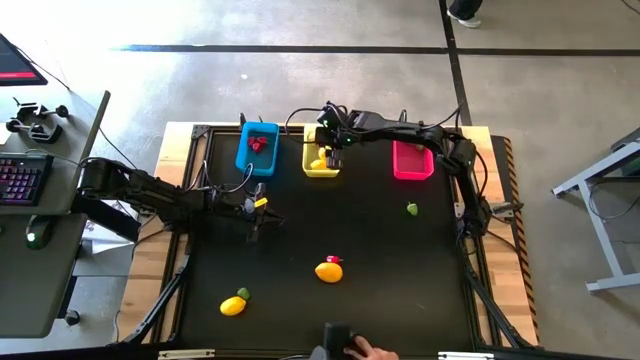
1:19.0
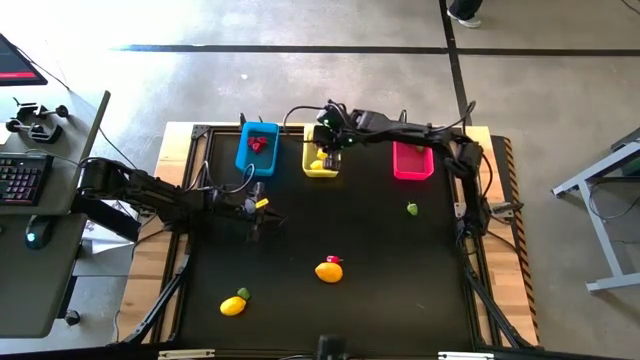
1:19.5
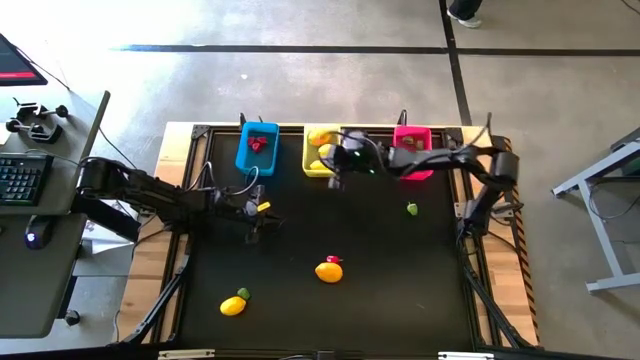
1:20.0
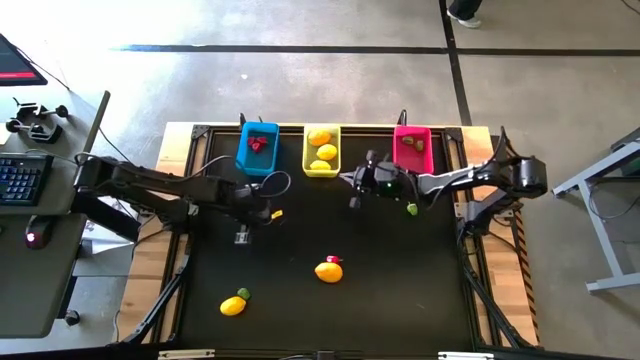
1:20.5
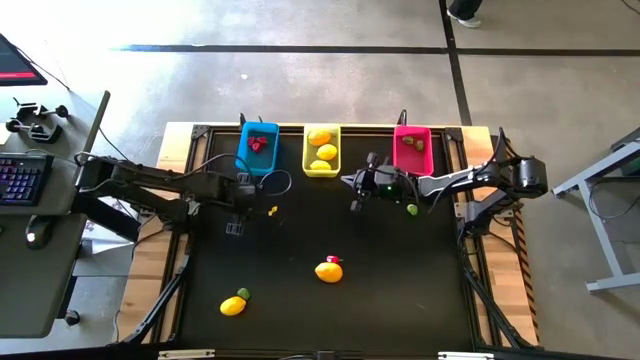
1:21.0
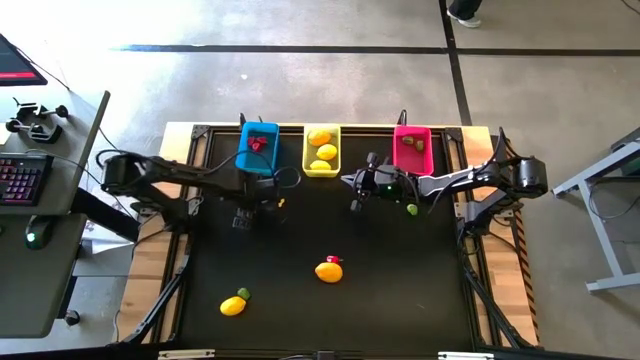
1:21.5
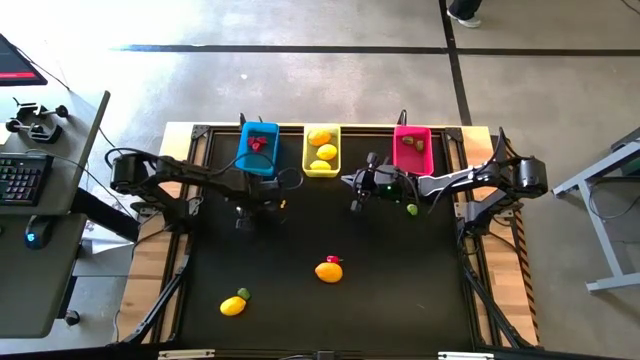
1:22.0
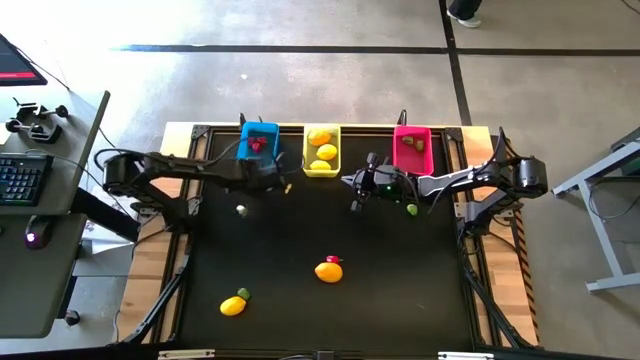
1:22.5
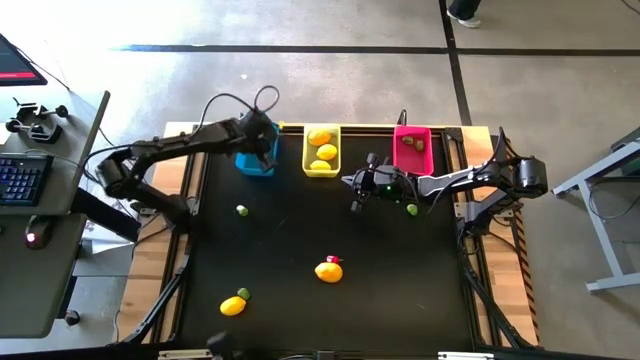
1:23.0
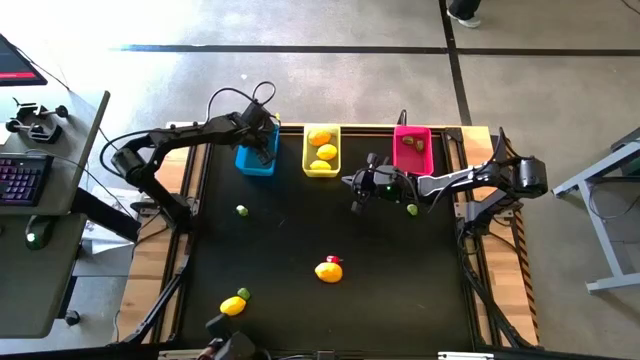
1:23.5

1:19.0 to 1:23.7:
Task: Sort produce into baskets
Put the red bell pepper into the blue bin

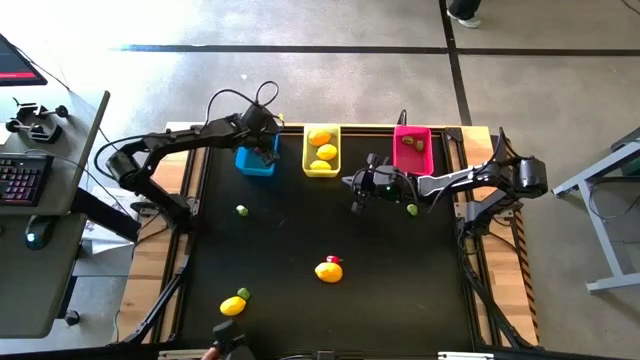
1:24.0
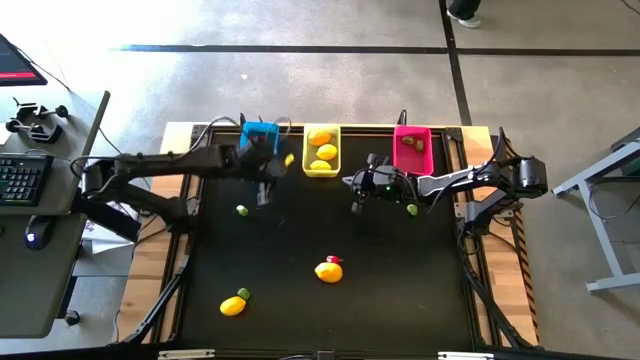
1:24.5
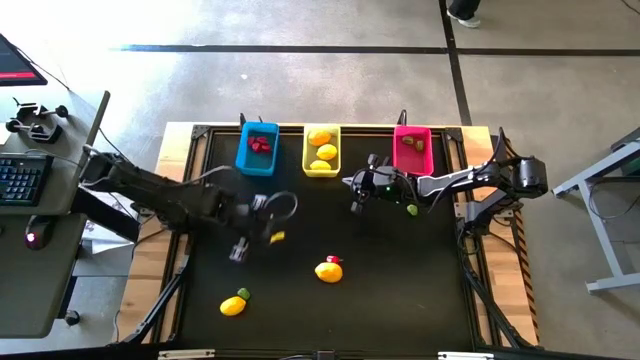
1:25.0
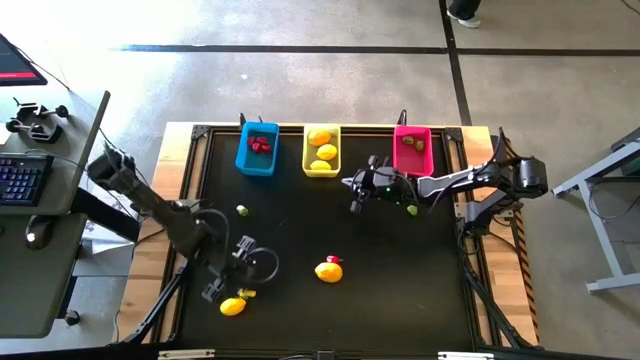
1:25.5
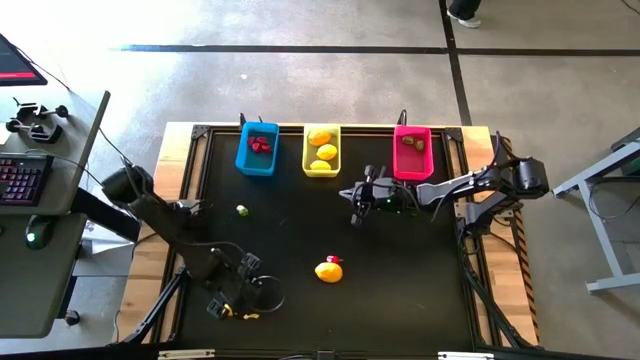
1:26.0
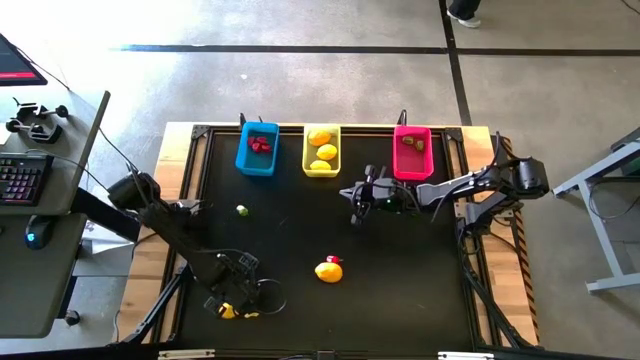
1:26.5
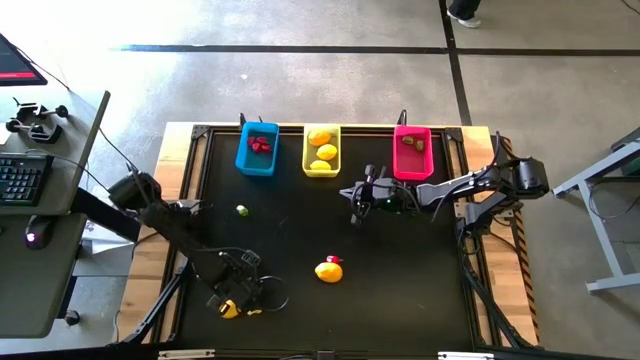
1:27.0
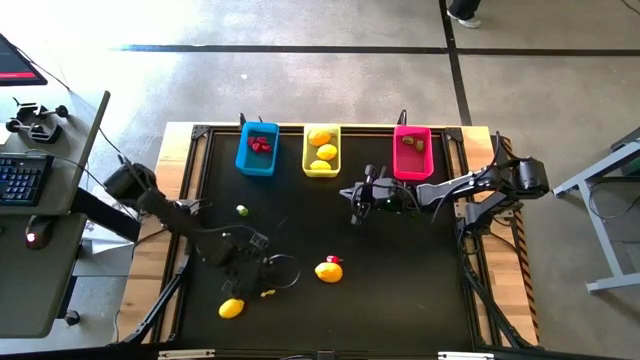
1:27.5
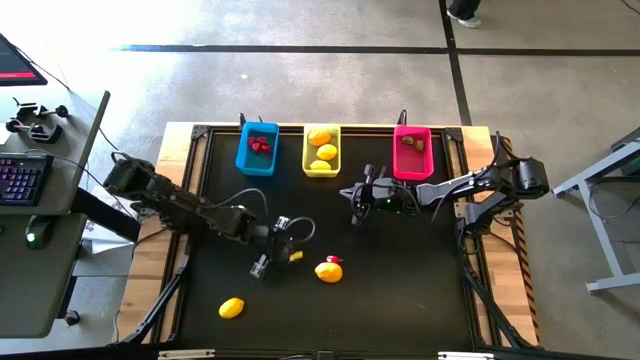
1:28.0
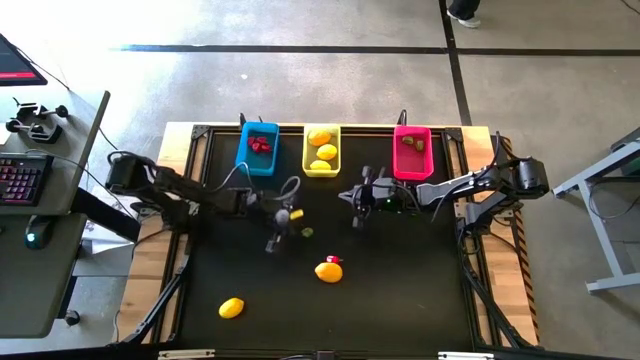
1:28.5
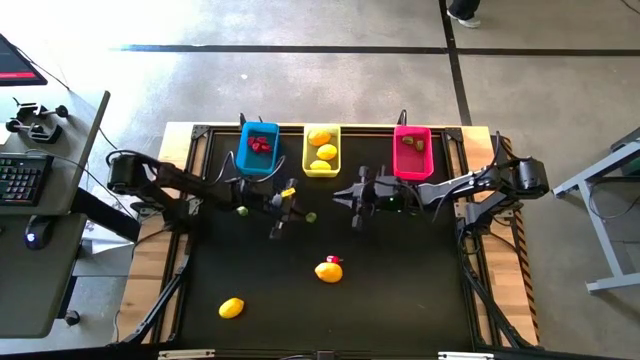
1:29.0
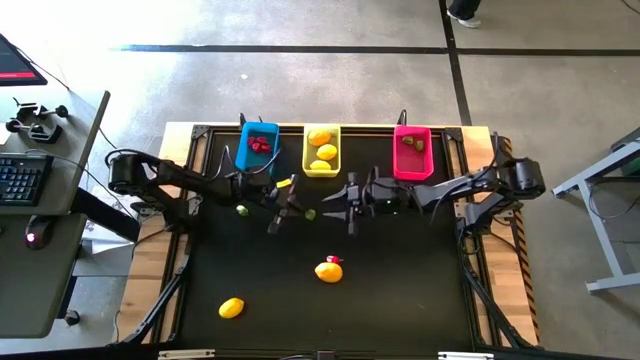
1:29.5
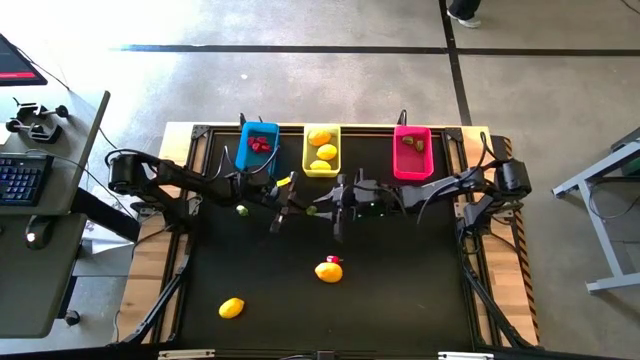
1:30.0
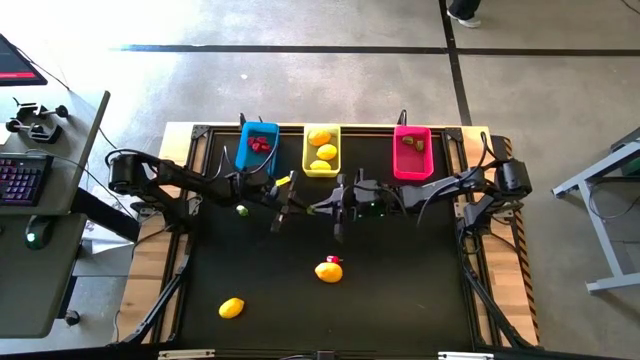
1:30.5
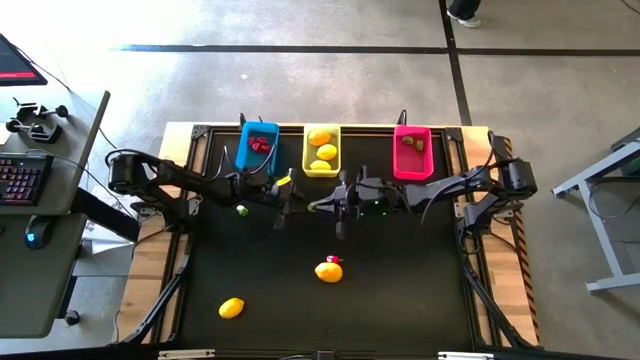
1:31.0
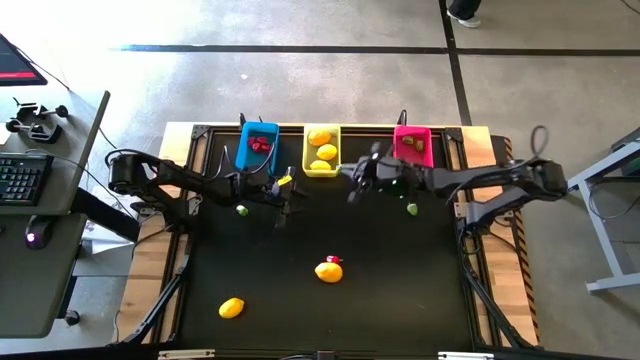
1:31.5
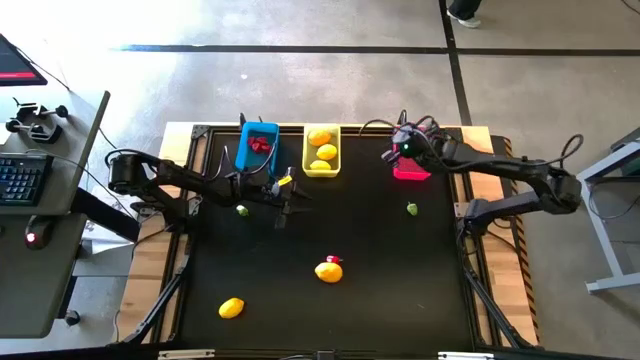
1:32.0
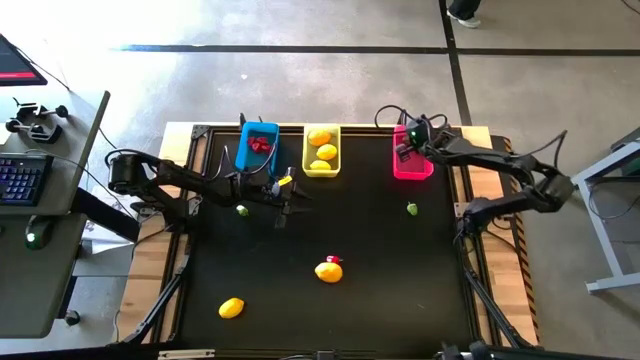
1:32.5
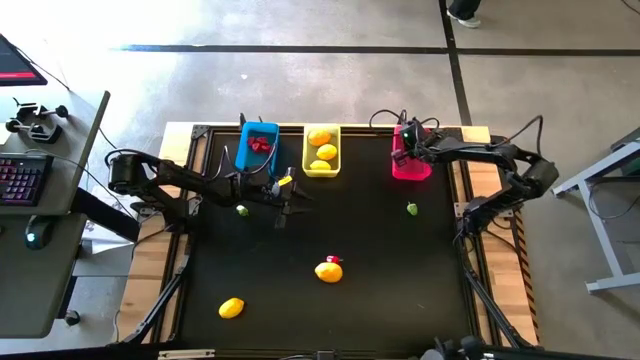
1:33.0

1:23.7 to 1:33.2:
Put the green bell pepper into the pink bin

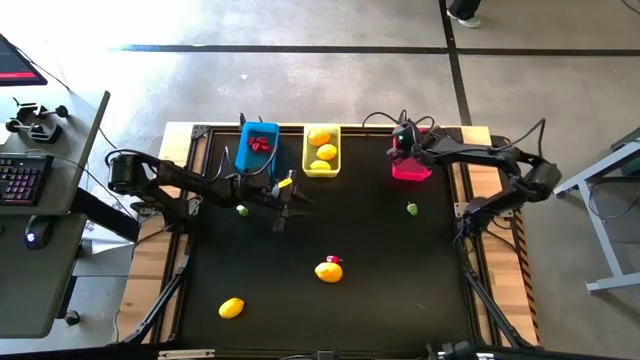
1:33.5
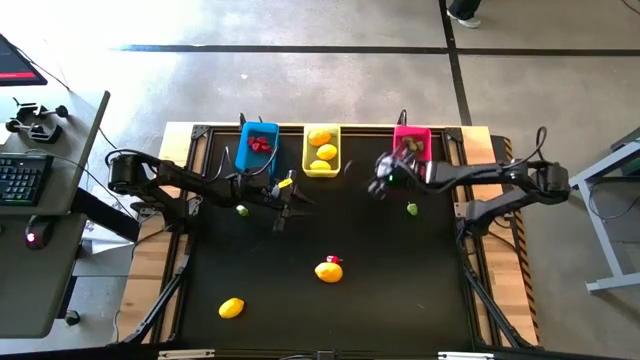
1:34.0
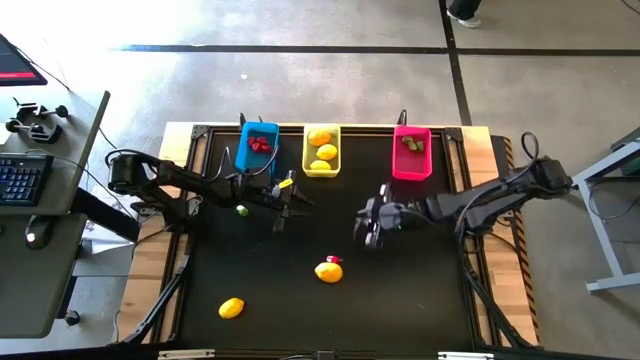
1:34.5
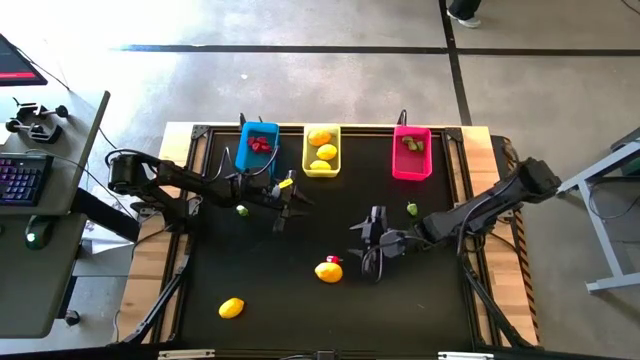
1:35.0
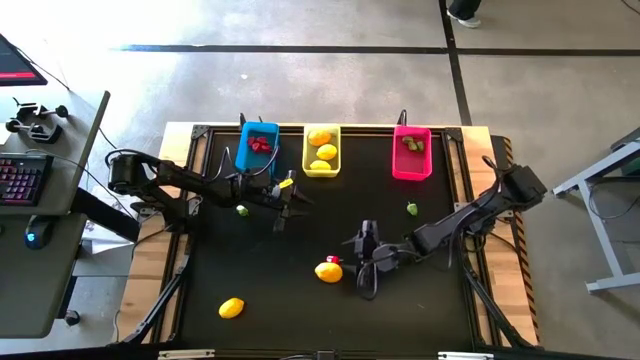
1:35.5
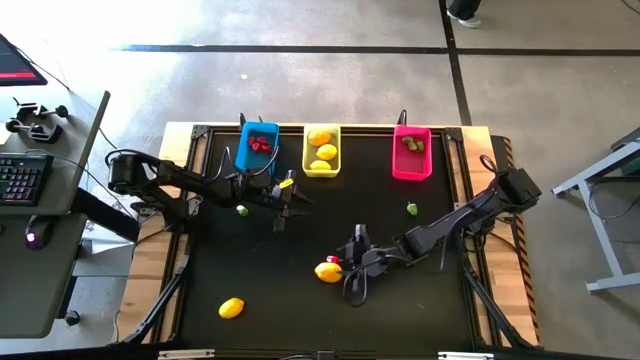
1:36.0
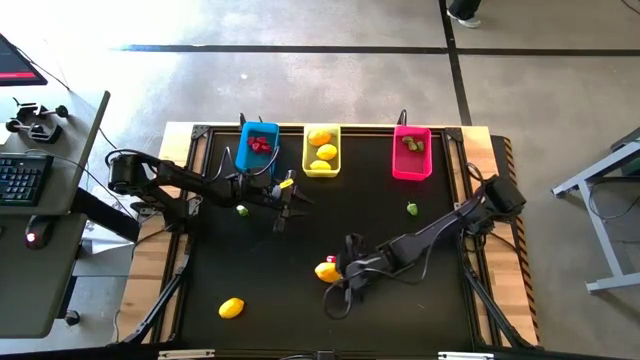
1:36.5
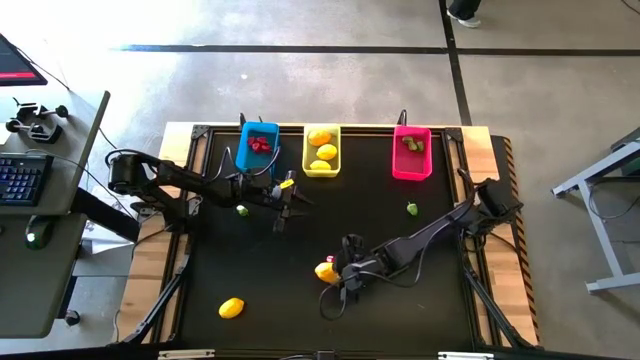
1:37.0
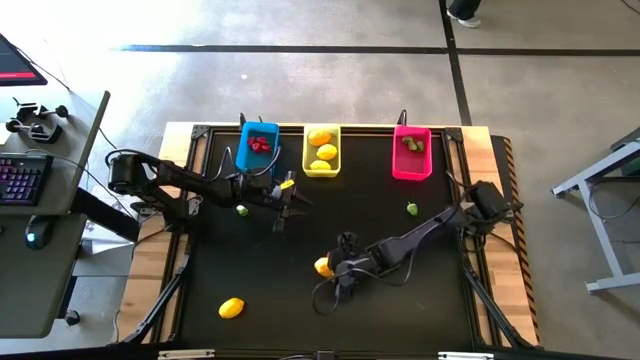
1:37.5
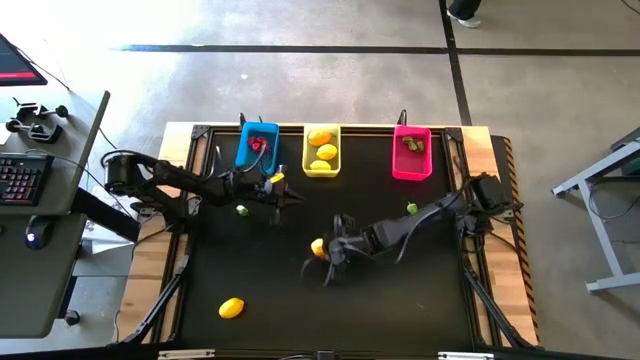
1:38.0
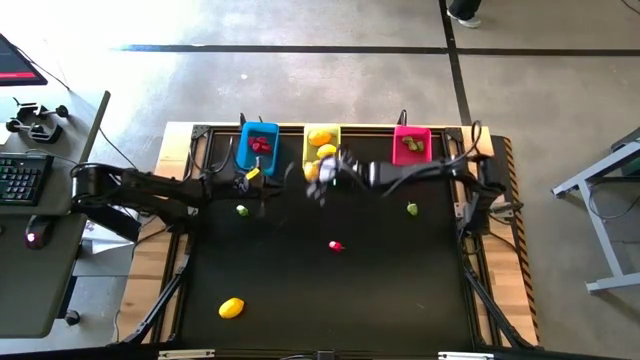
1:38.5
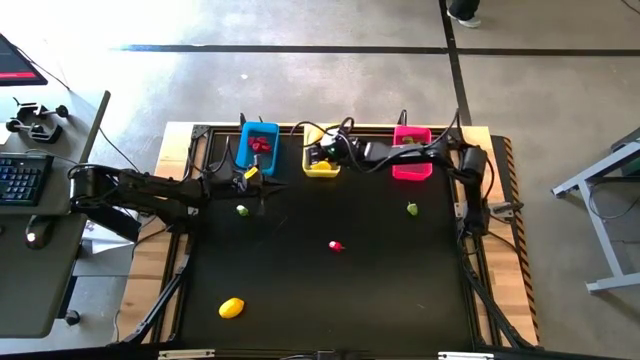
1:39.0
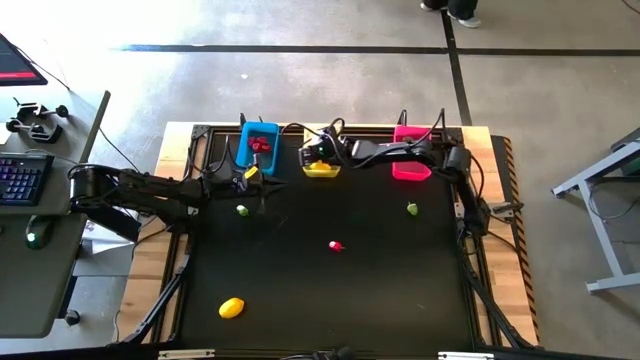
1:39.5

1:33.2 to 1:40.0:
Put the yellow lemon into the yellow bin

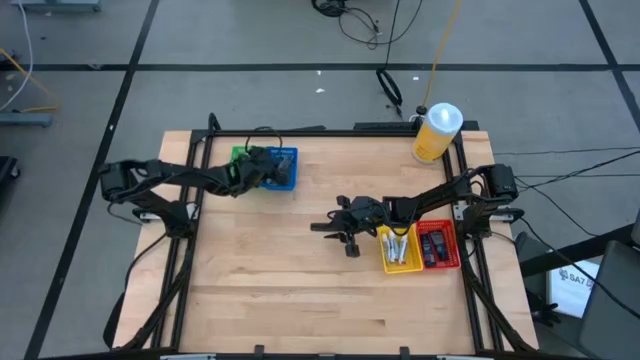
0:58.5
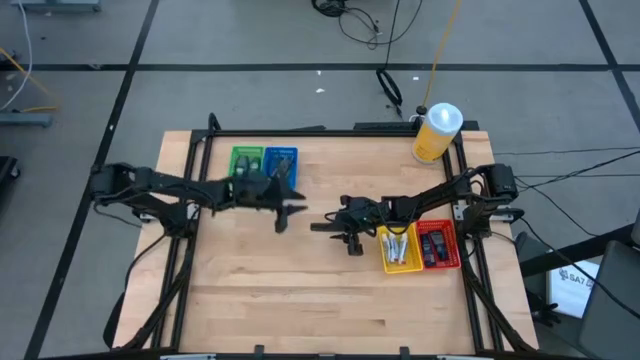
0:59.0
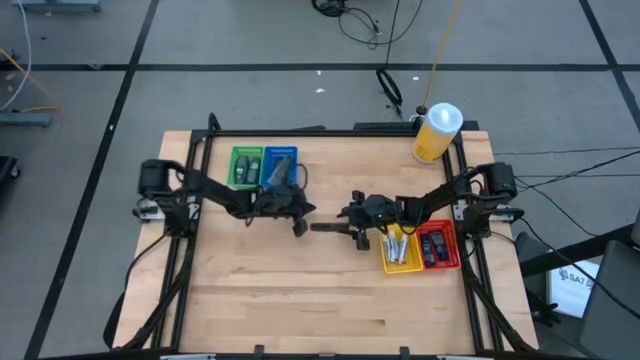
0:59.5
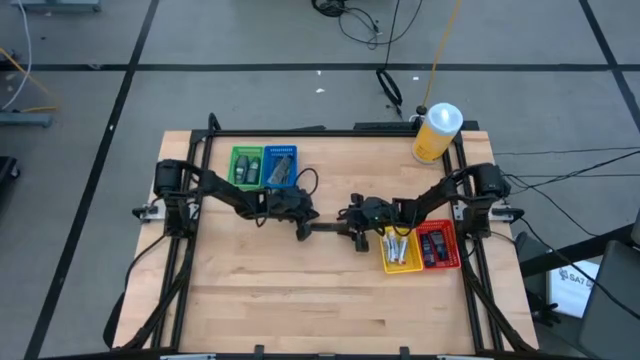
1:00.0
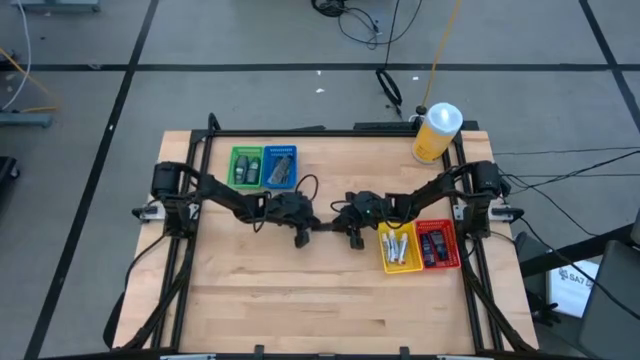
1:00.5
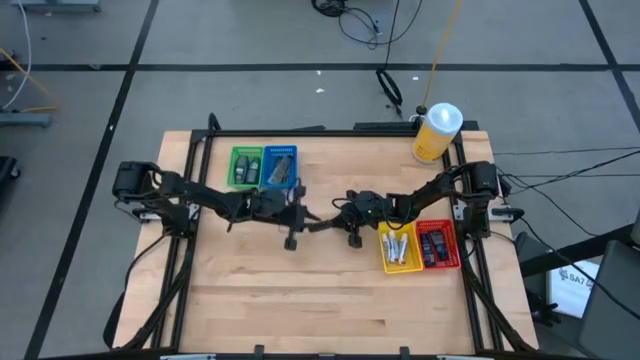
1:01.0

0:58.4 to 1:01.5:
Task: Pick & Place Travel size toiletries
Put the black comb into the blue bin
